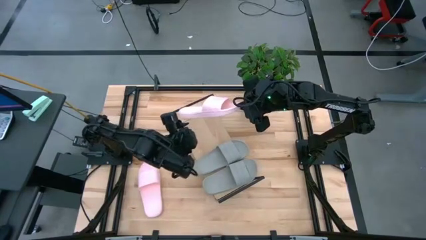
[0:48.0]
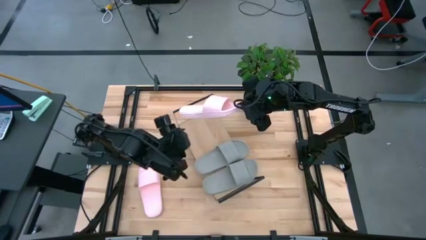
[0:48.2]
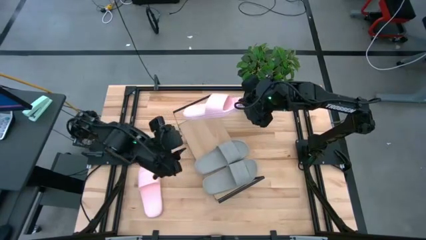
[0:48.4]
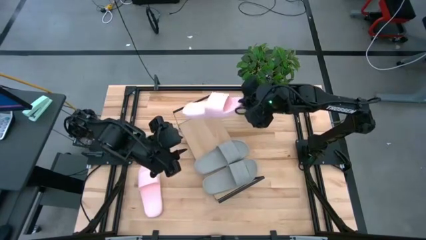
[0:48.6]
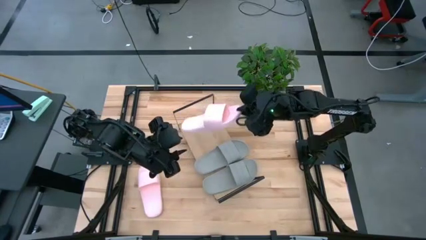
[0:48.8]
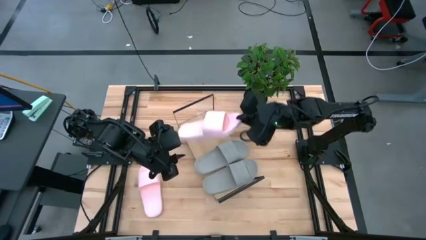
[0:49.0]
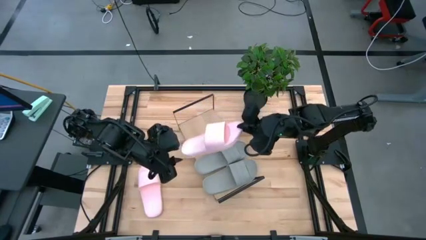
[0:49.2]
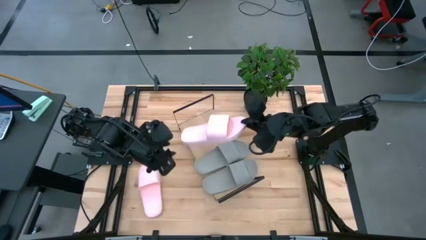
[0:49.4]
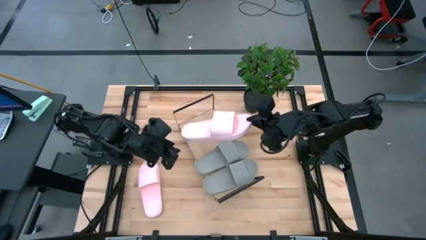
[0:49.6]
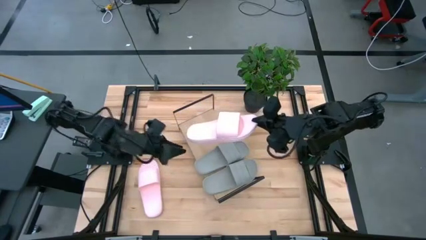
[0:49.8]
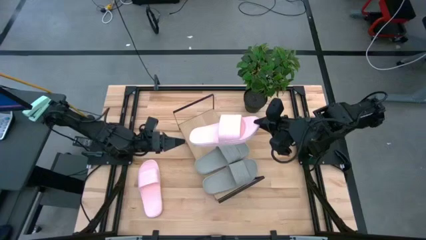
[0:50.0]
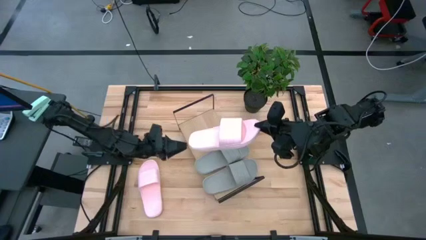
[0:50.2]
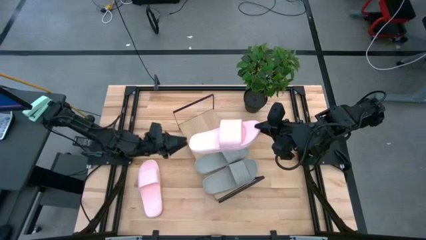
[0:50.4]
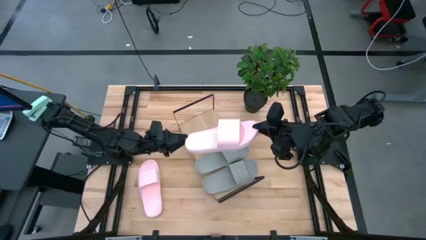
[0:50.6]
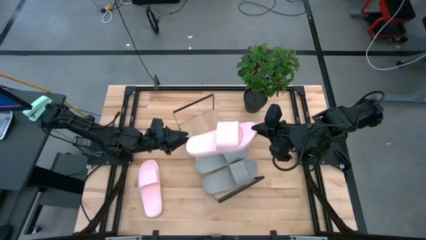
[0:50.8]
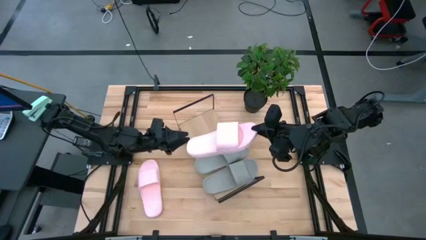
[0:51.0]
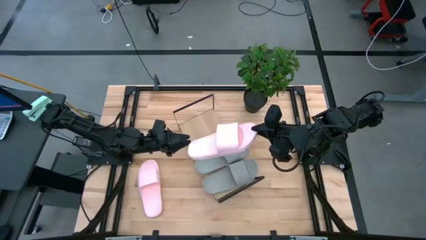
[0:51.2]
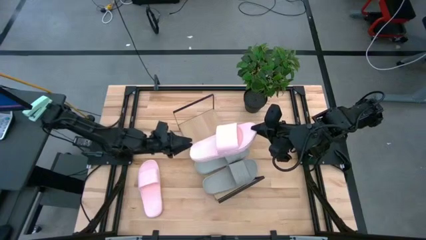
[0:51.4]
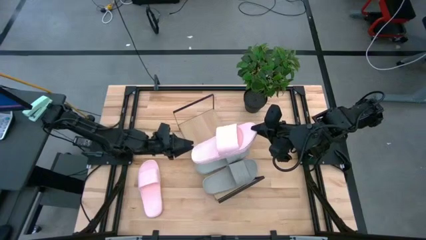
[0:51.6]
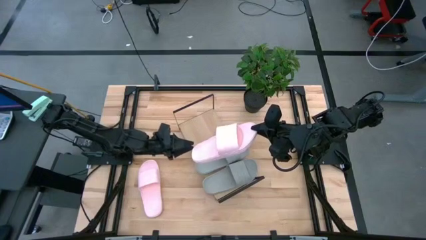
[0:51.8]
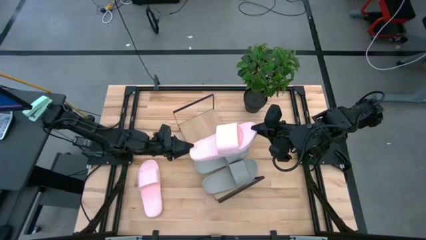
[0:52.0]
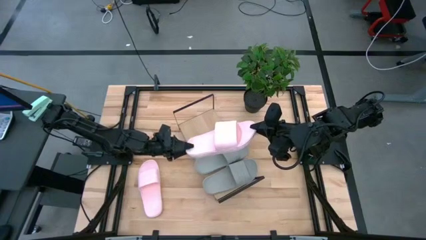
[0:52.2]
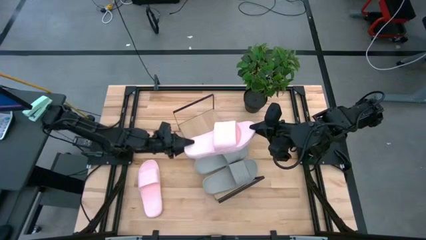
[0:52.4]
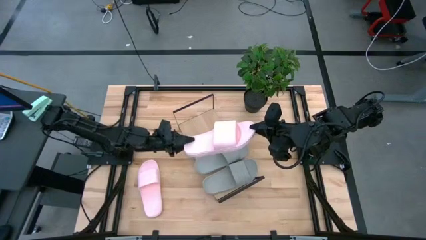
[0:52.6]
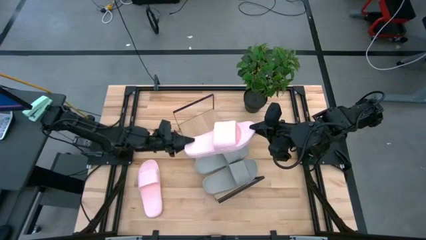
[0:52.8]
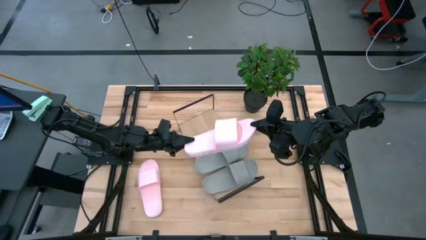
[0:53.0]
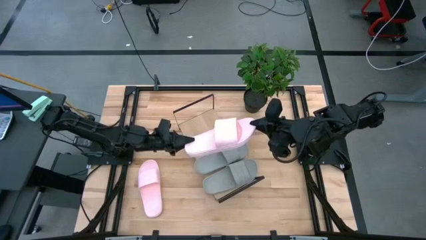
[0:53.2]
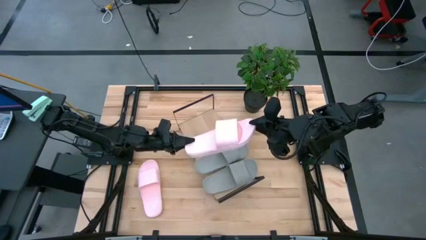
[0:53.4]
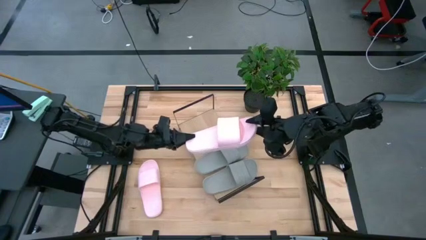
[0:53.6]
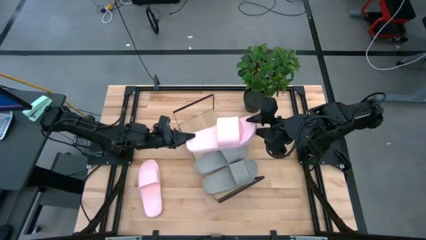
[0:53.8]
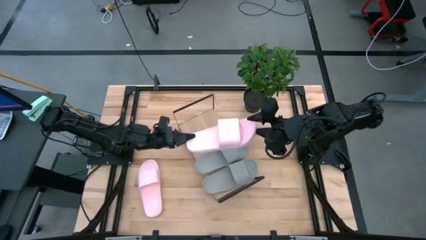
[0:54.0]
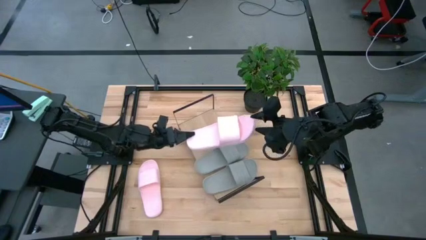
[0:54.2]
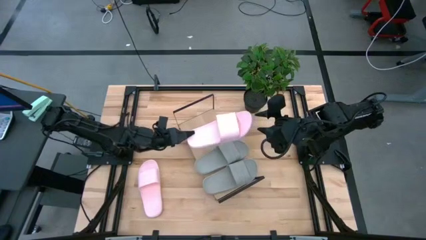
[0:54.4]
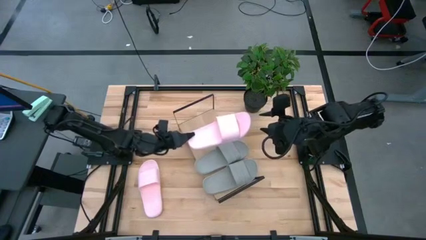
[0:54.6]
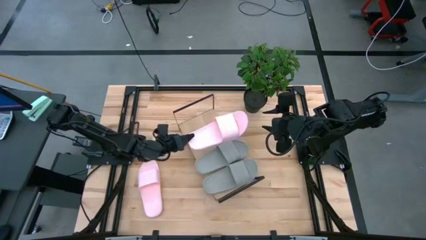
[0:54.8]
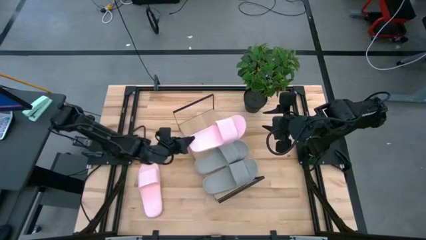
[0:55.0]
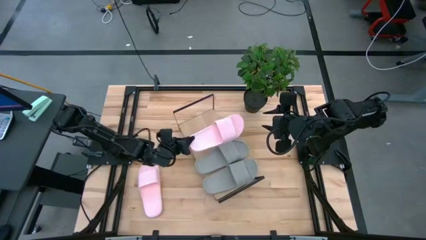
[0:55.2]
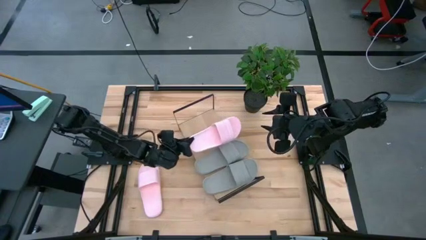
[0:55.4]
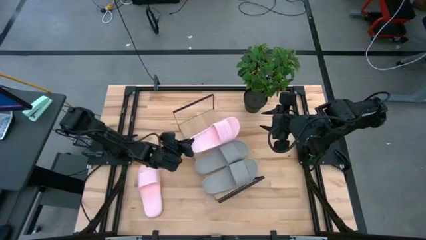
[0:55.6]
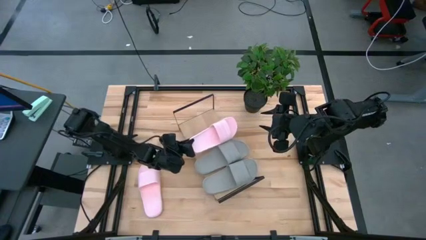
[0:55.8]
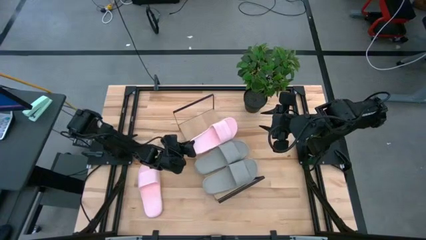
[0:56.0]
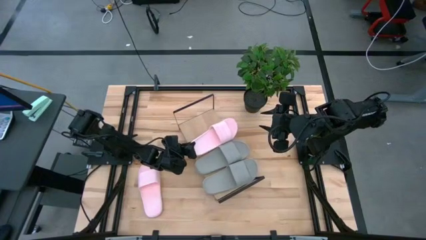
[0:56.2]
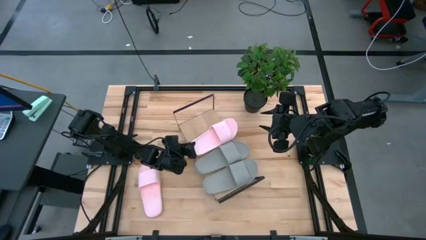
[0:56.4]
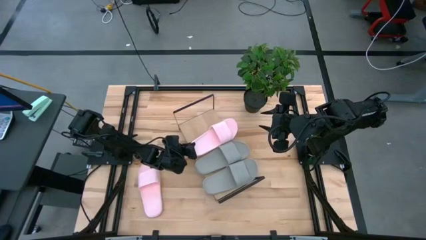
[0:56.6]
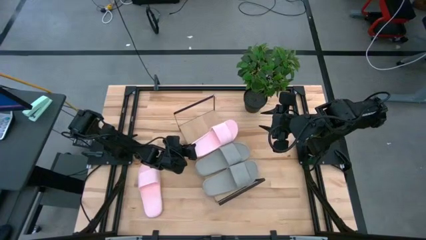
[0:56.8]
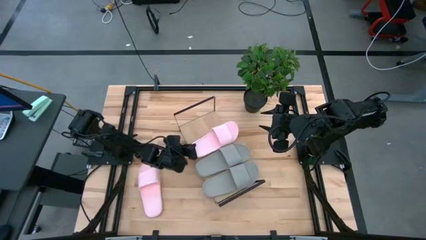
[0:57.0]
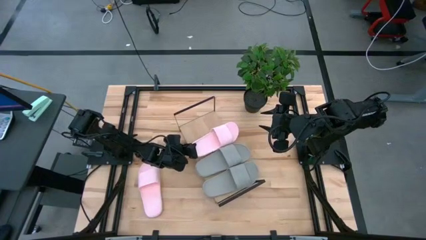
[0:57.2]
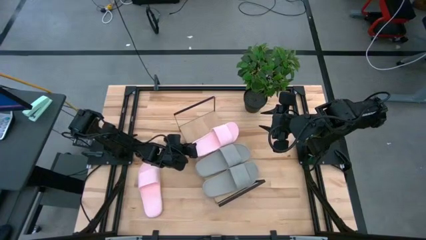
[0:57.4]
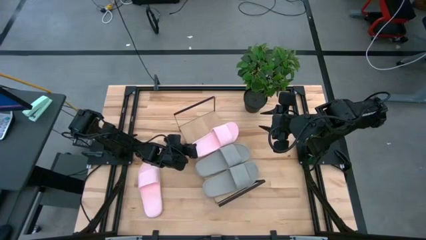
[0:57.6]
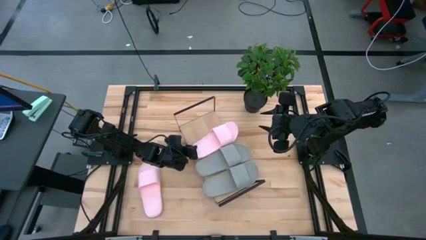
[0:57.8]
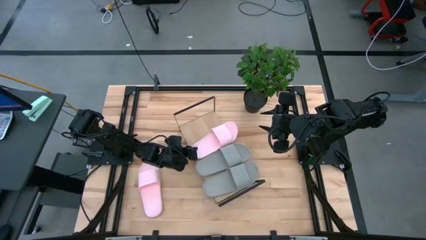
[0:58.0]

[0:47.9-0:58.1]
Task: Pick and place slides into the shelf
Put the bottom pink slide on the shelf
